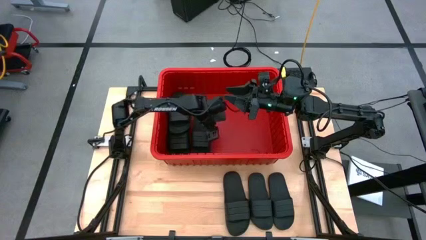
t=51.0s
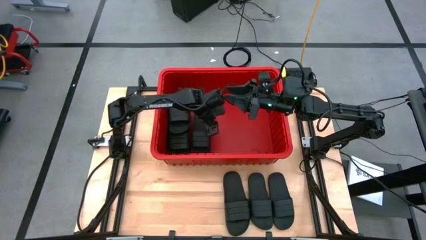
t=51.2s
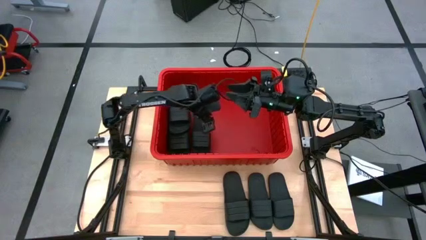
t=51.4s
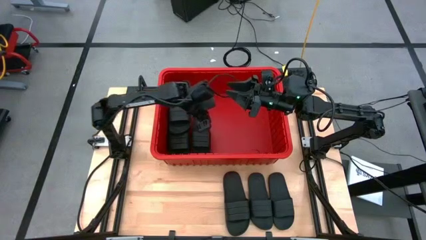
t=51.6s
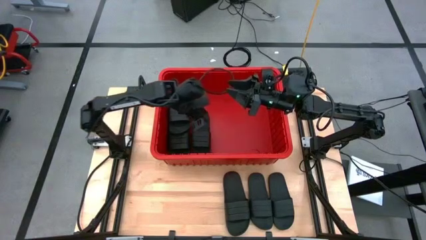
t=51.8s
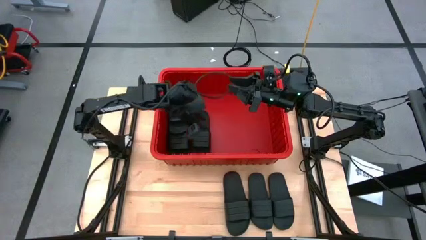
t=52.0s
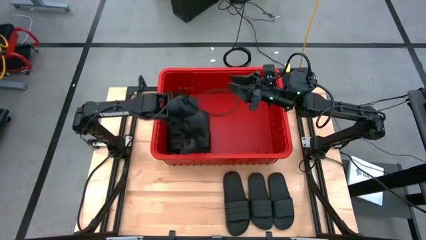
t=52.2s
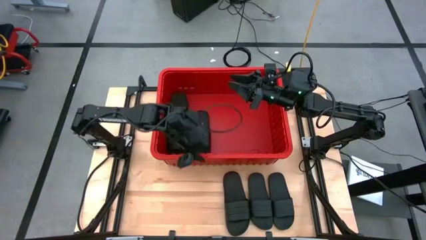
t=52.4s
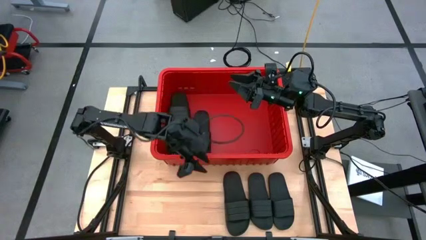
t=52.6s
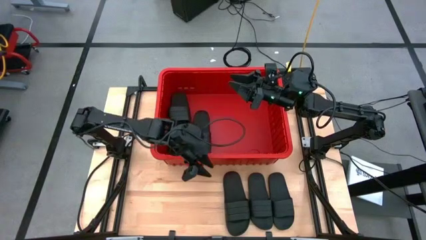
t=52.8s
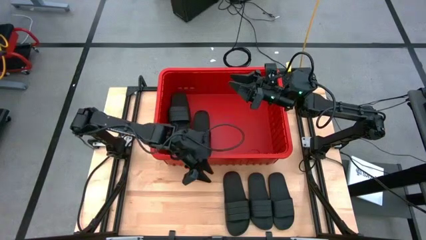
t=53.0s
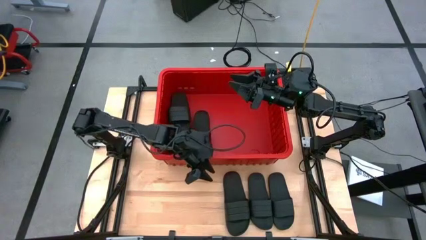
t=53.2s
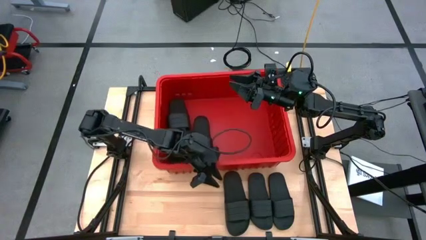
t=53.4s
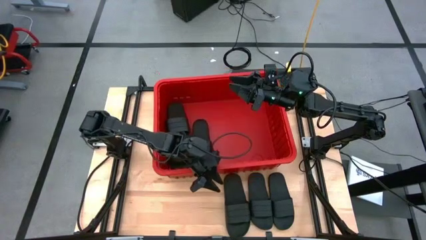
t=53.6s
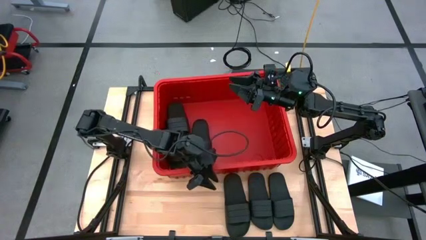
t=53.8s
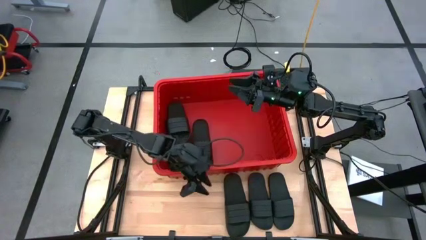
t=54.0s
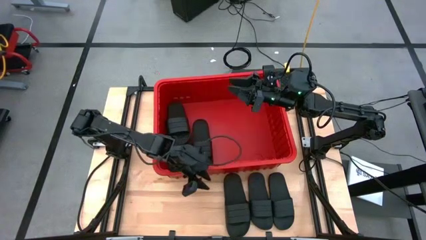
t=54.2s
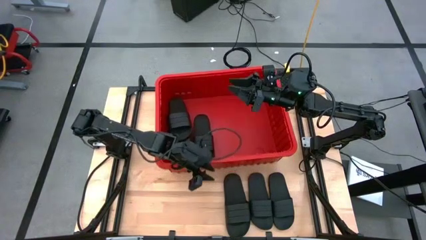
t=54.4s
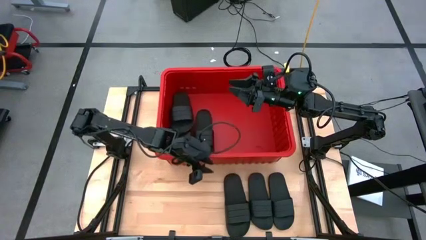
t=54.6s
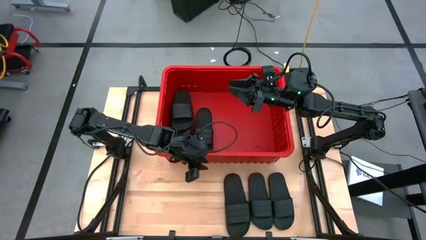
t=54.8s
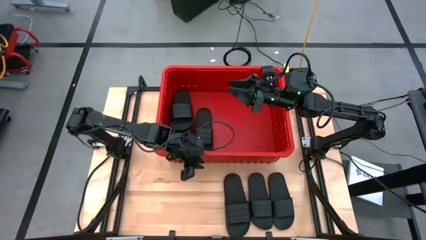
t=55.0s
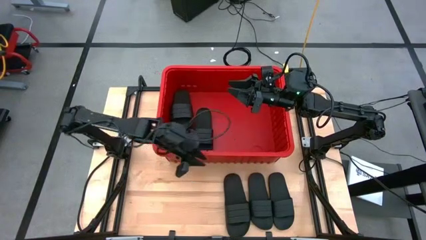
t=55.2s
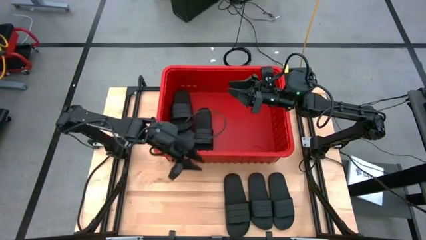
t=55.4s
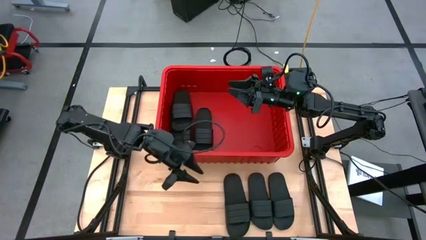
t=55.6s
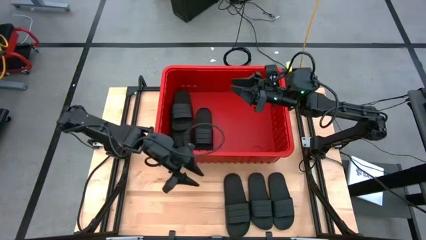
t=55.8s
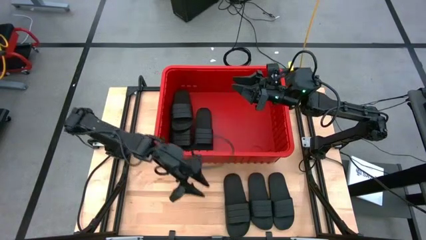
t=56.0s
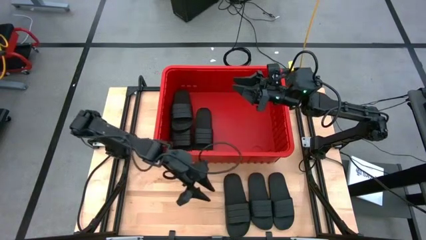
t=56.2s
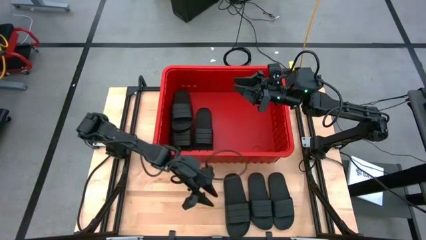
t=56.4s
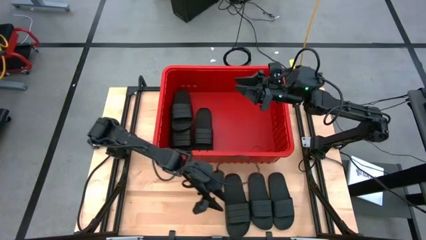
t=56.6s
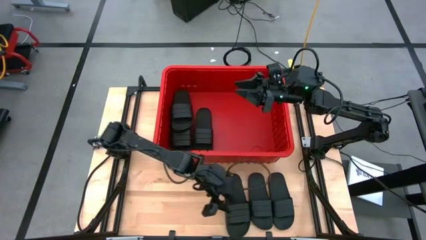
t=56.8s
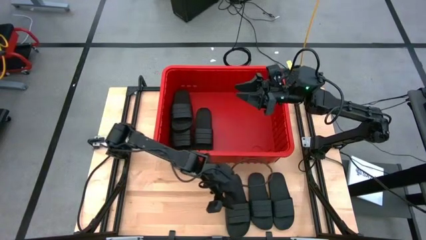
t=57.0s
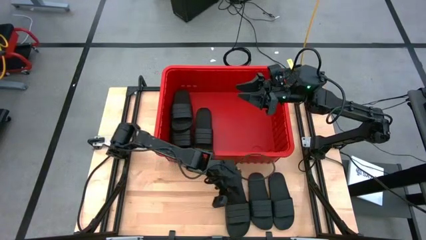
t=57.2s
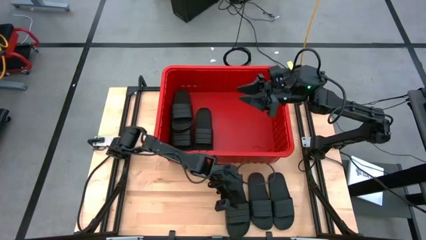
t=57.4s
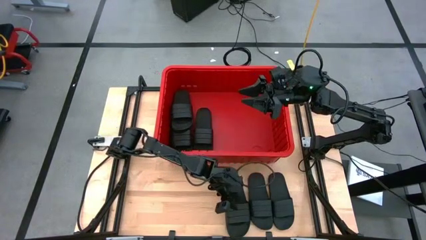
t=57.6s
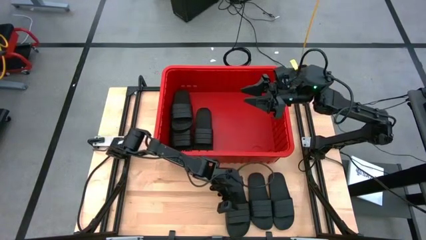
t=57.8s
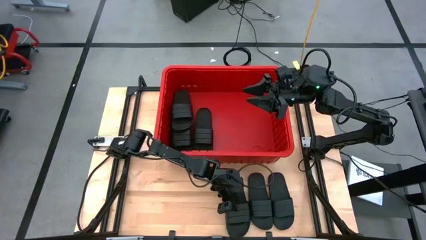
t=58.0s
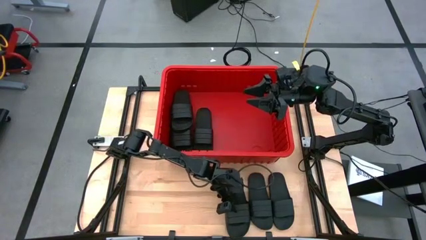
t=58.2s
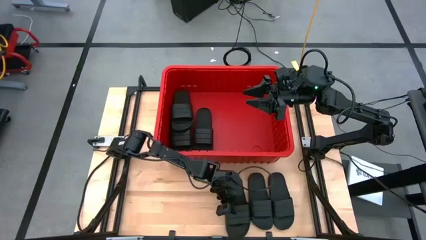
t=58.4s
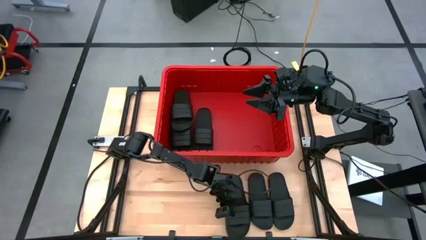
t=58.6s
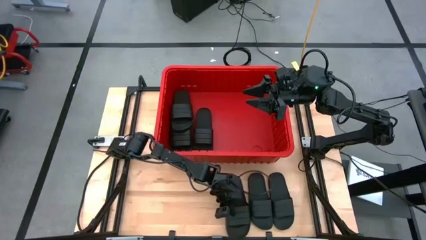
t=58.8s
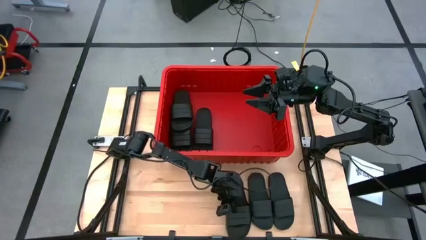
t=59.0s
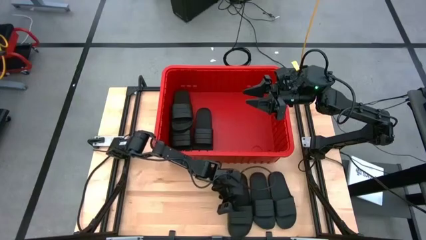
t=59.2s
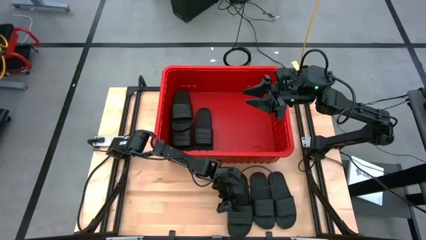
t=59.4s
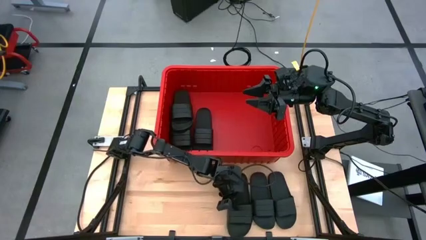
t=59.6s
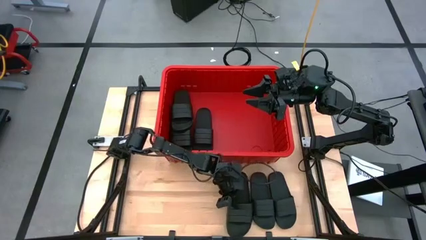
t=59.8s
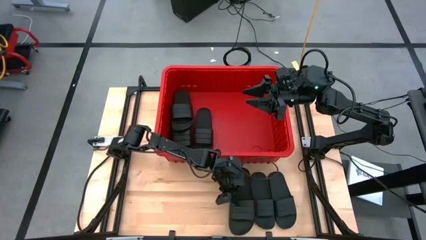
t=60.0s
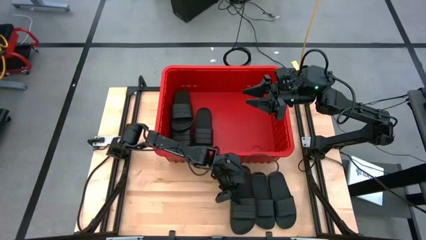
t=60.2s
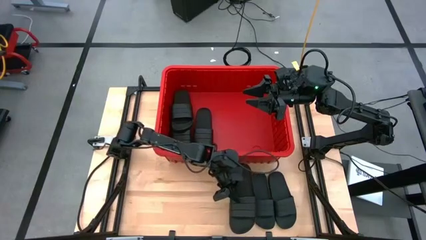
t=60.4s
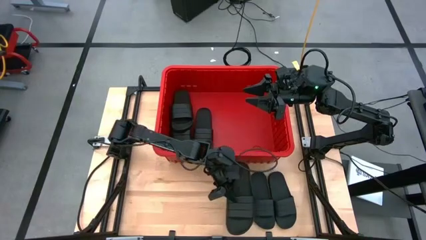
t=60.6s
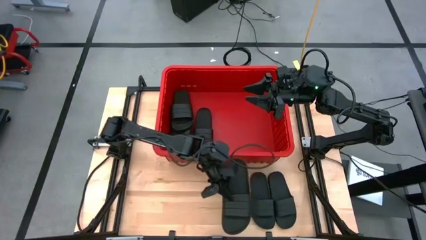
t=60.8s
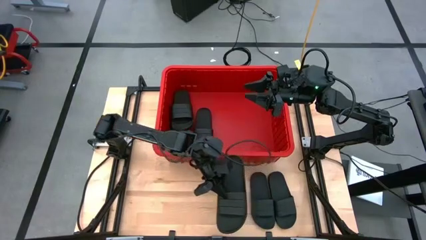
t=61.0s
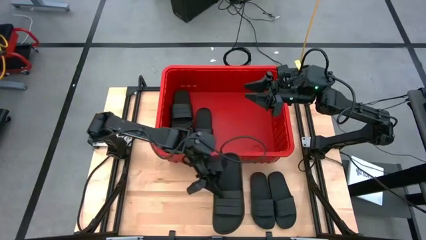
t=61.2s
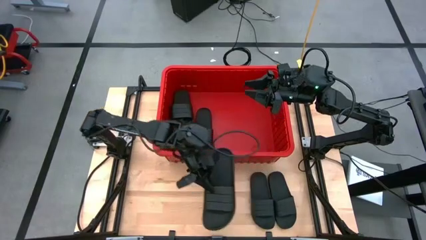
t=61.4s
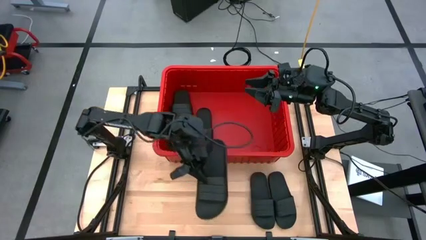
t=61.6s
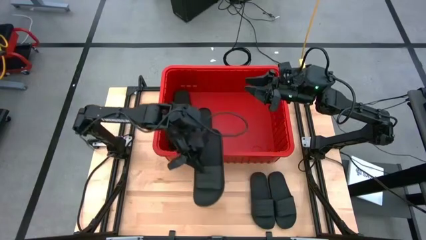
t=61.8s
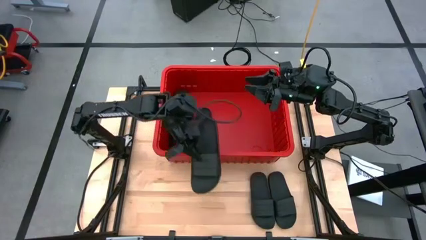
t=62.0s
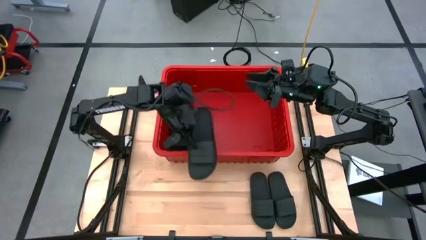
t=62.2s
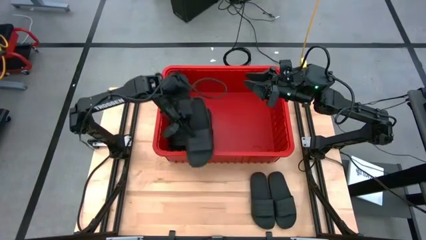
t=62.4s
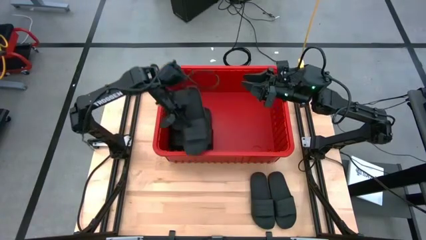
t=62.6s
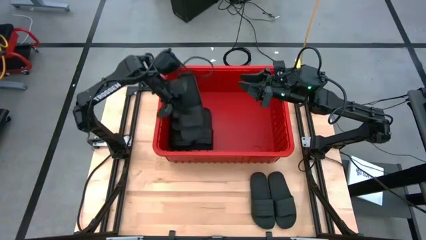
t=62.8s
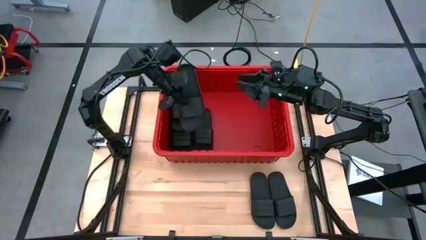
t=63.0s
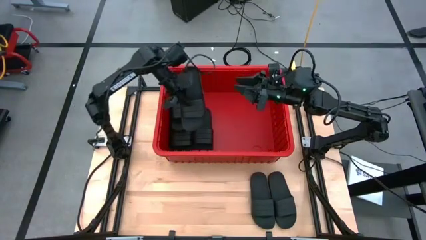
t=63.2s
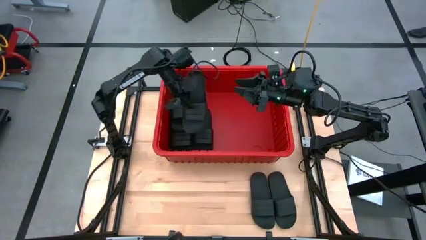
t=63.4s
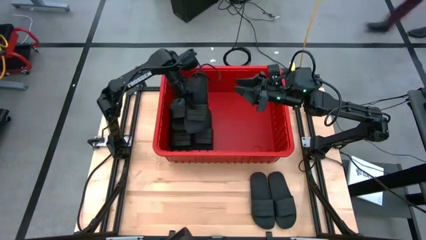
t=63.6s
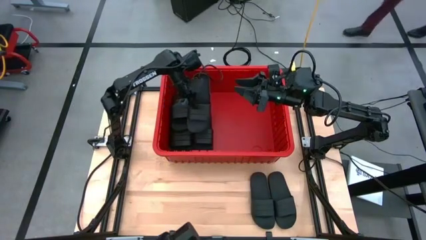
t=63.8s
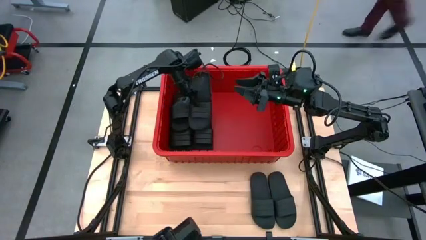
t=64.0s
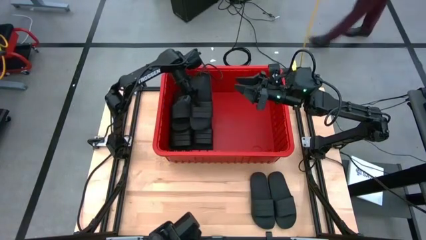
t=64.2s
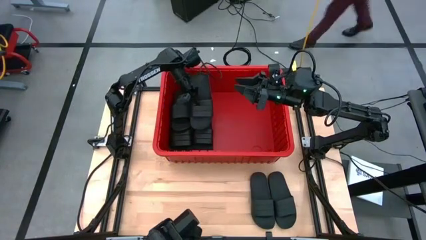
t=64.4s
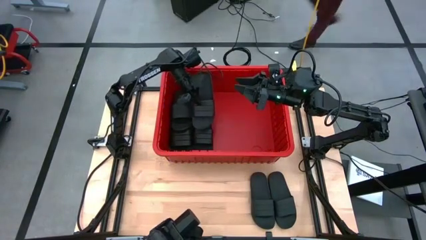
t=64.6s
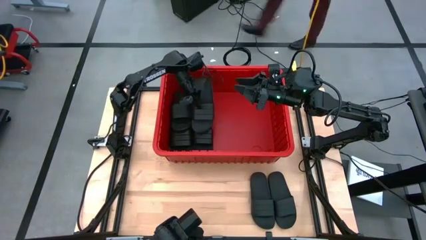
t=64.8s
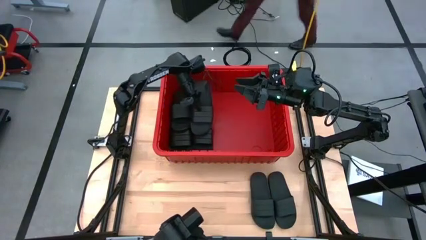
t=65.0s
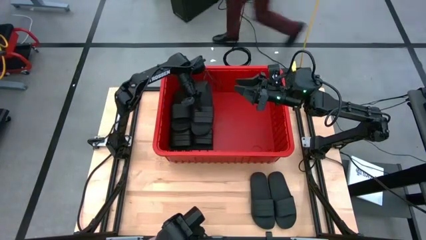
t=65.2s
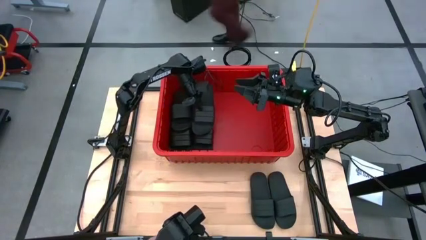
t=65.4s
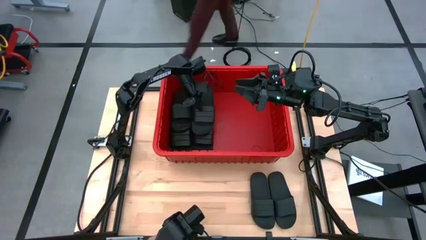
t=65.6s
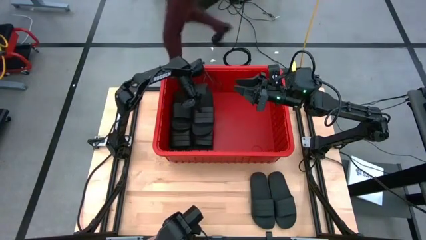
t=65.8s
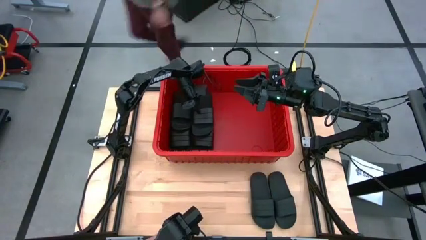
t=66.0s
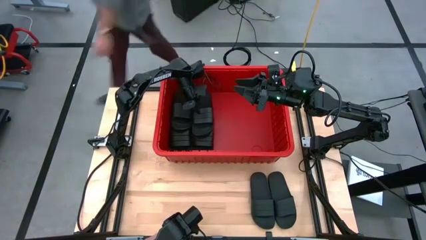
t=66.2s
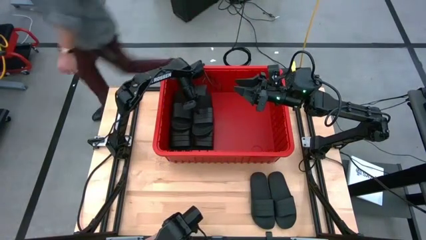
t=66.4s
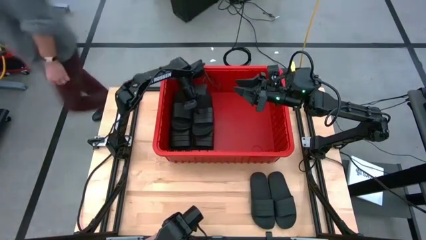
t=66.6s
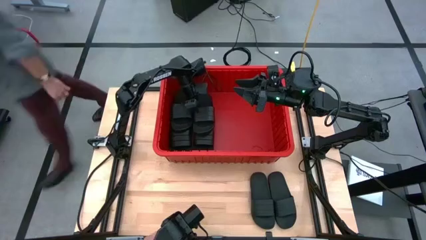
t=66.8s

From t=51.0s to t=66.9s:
Task: Pick and place slides into bin
Put the black slide into the red bin

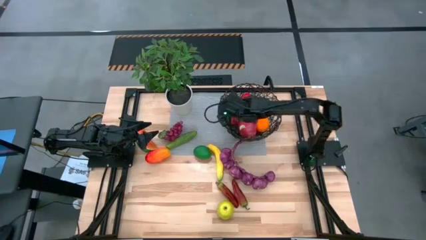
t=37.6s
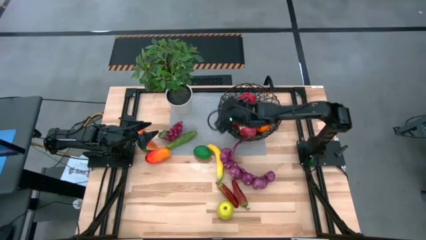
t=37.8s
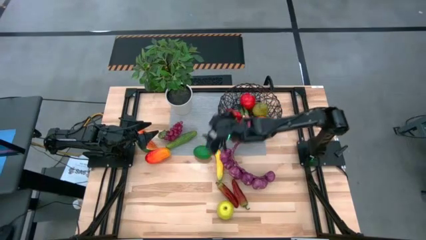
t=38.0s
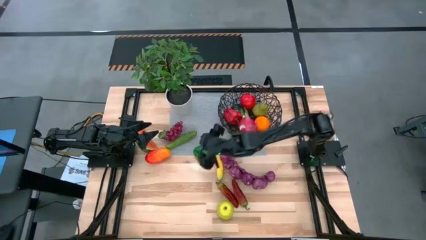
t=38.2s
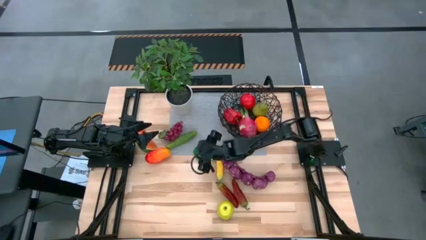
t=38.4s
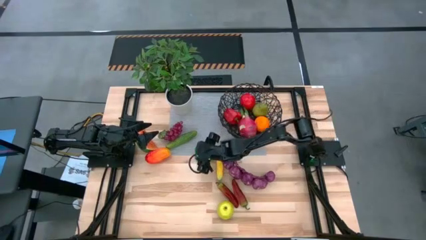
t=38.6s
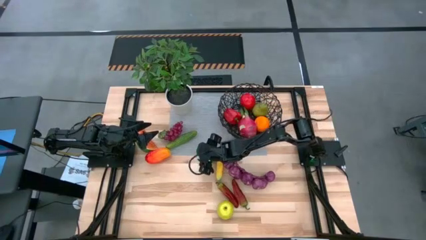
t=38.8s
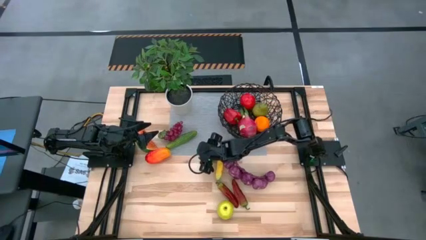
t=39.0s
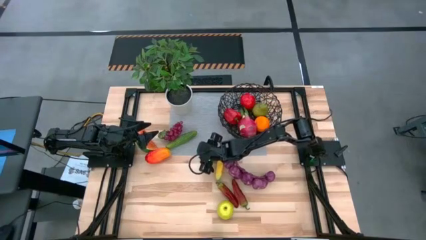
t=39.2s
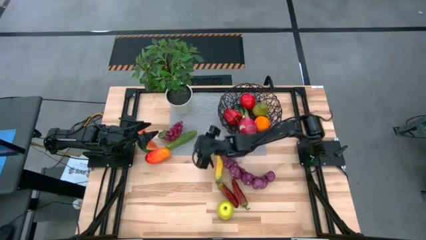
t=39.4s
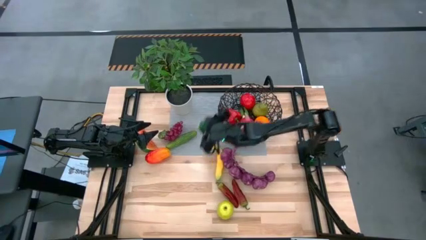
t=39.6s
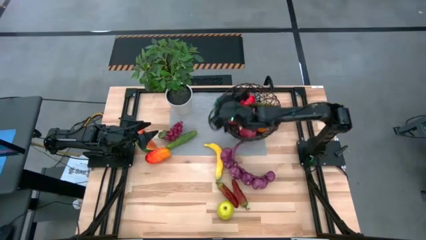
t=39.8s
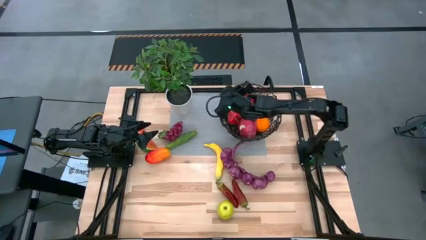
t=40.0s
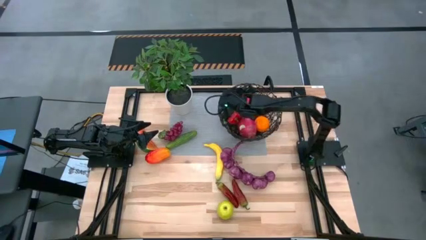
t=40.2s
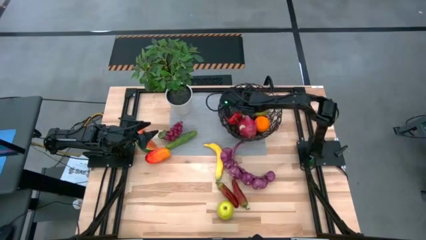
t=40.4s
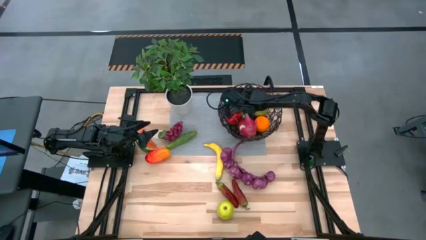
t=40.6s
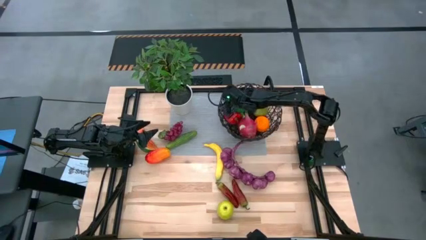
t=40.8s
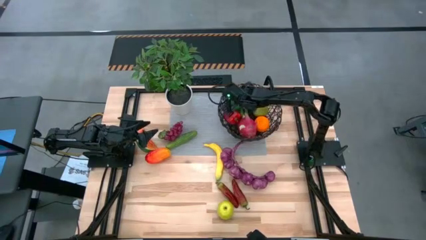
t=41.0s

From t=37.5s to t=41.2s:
Task: Build produce basket
Put the lime into the wire basket
